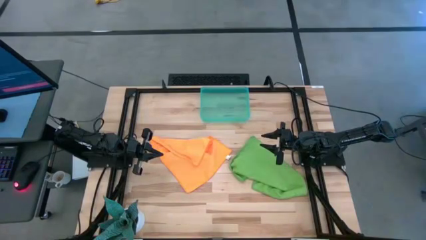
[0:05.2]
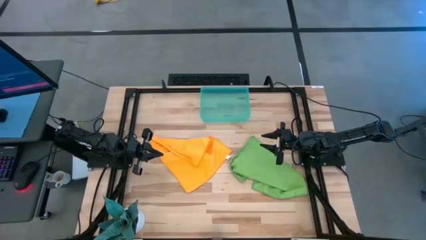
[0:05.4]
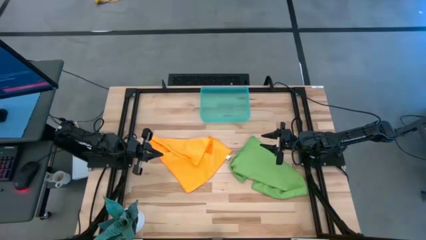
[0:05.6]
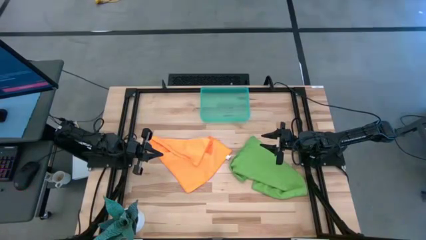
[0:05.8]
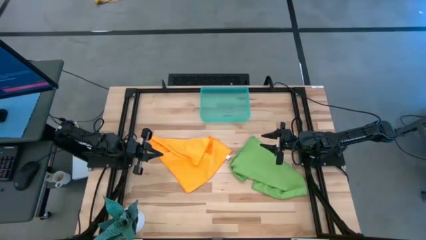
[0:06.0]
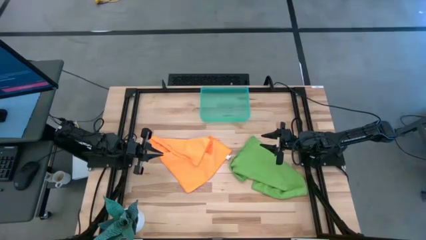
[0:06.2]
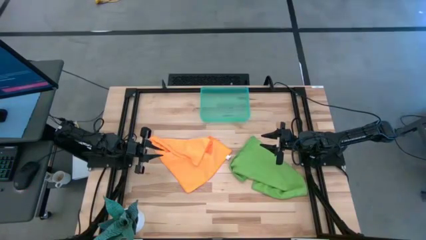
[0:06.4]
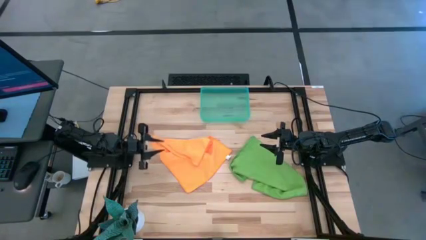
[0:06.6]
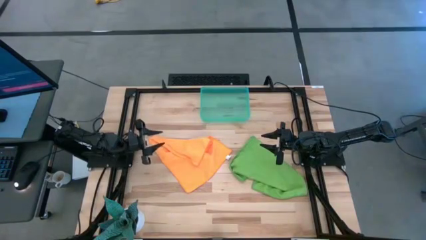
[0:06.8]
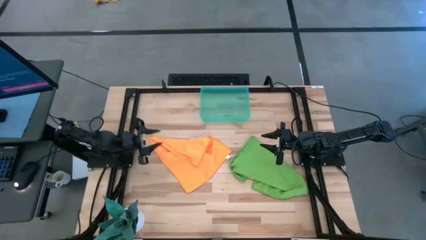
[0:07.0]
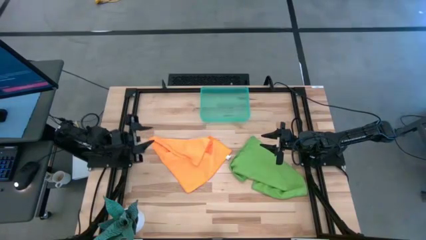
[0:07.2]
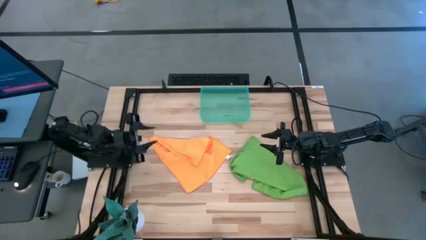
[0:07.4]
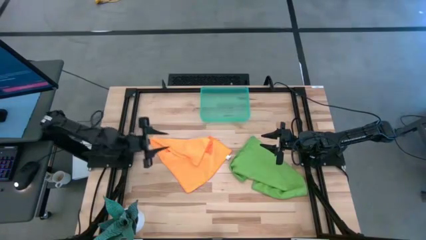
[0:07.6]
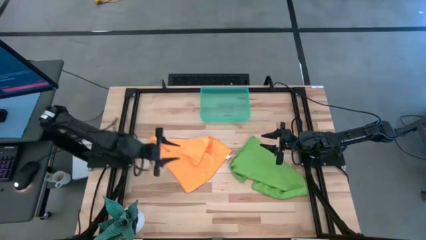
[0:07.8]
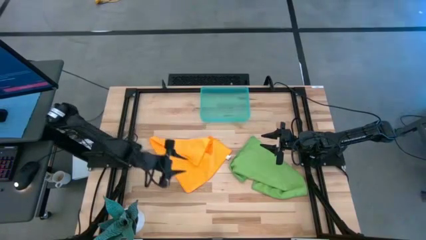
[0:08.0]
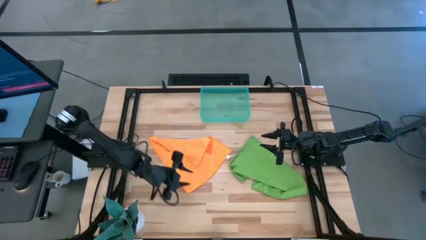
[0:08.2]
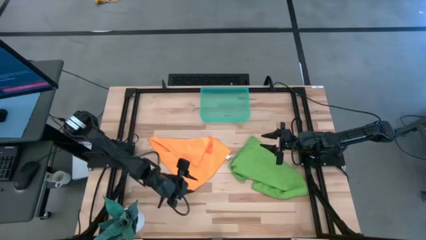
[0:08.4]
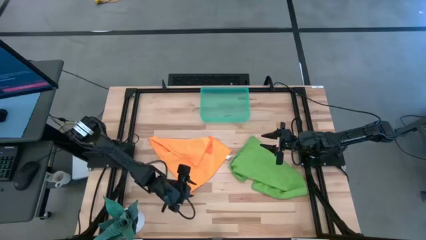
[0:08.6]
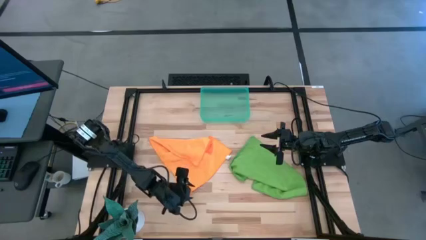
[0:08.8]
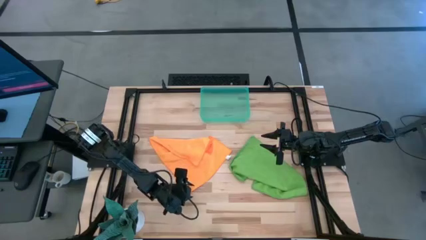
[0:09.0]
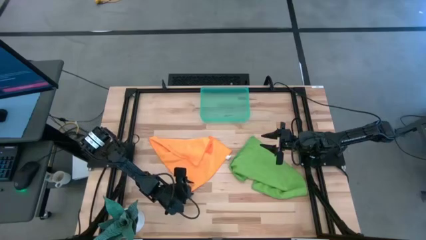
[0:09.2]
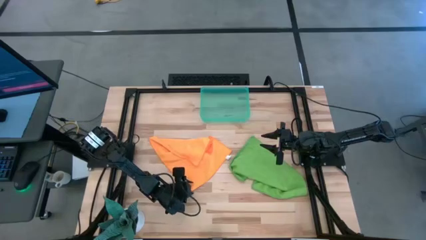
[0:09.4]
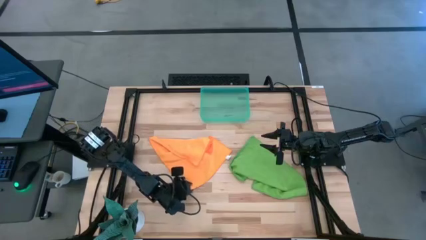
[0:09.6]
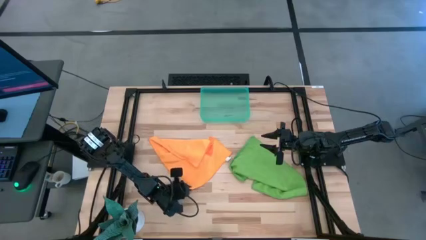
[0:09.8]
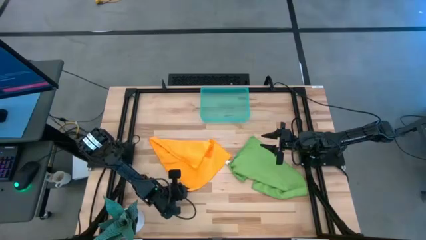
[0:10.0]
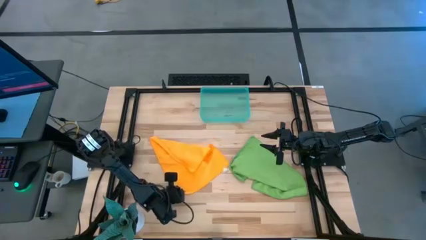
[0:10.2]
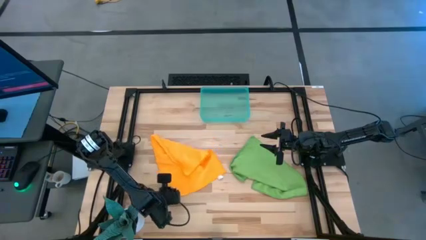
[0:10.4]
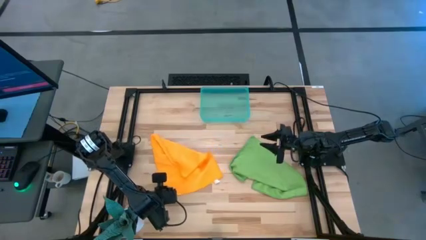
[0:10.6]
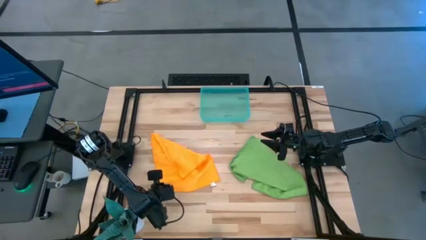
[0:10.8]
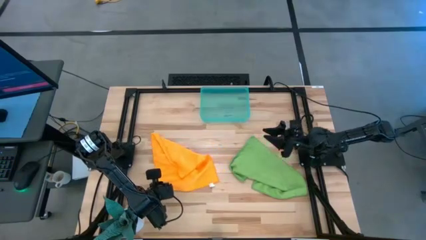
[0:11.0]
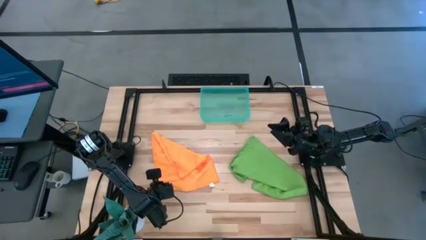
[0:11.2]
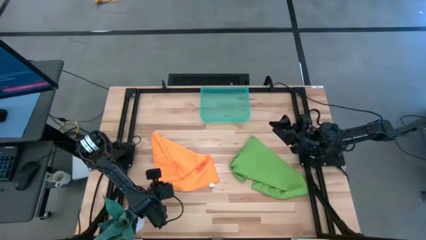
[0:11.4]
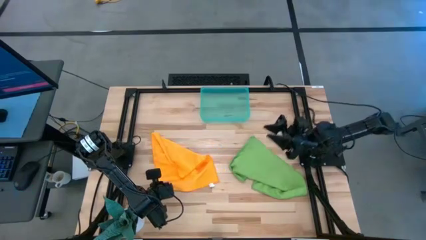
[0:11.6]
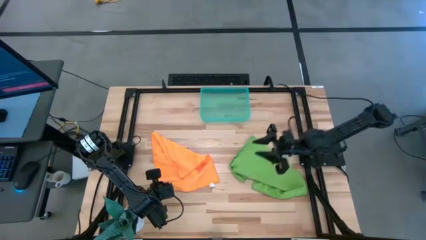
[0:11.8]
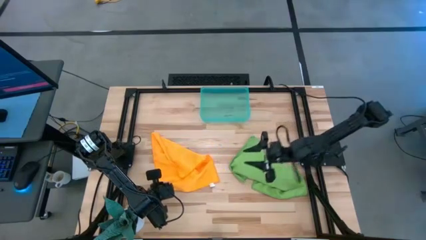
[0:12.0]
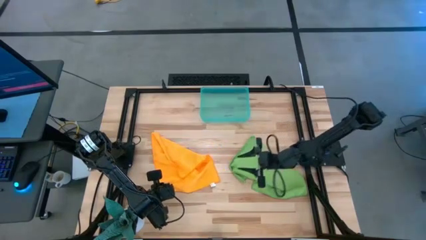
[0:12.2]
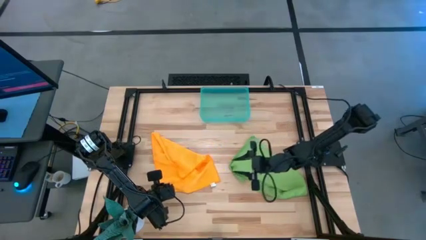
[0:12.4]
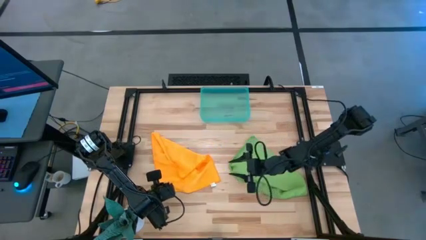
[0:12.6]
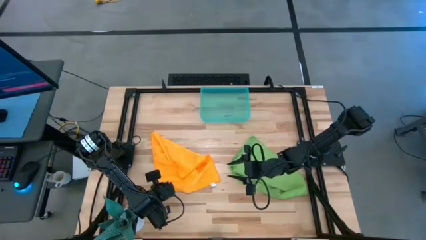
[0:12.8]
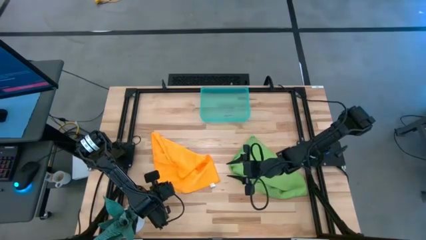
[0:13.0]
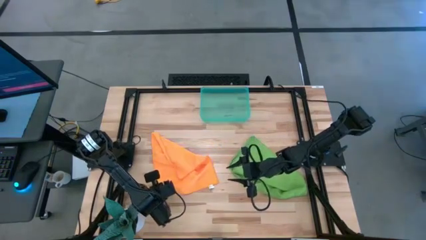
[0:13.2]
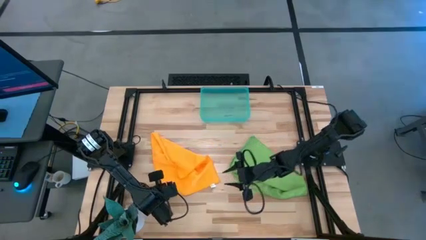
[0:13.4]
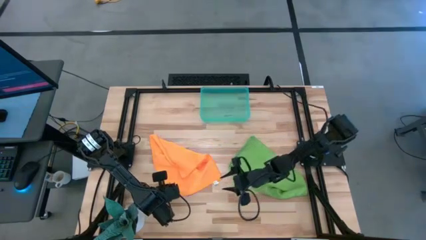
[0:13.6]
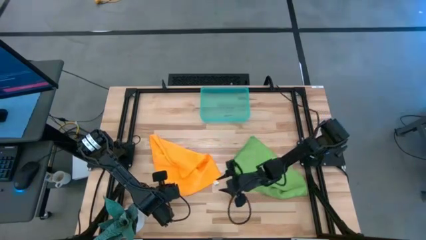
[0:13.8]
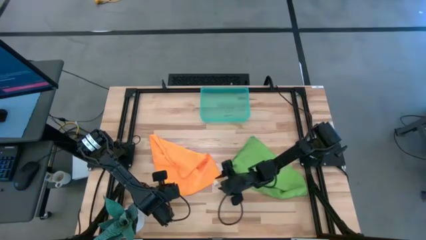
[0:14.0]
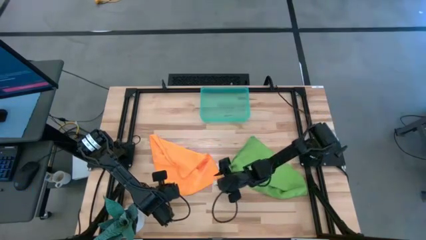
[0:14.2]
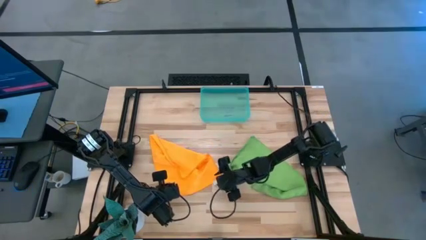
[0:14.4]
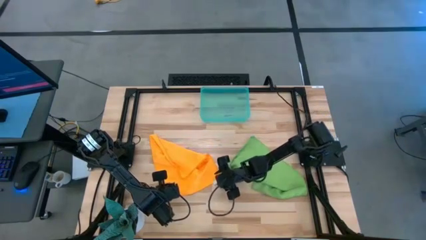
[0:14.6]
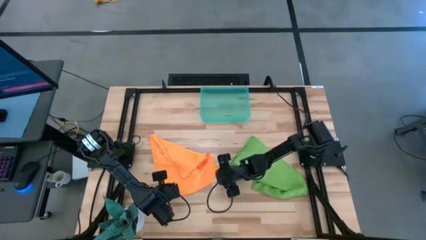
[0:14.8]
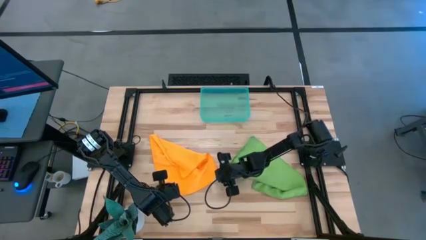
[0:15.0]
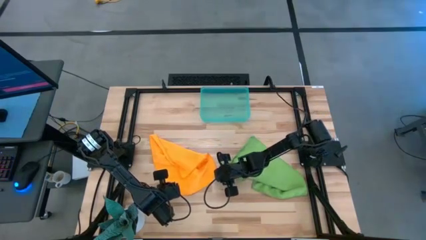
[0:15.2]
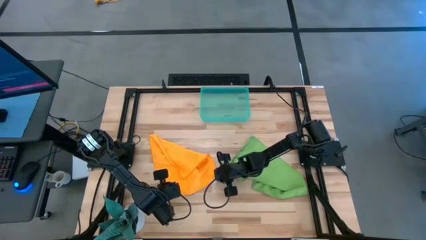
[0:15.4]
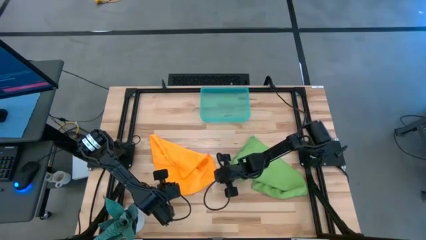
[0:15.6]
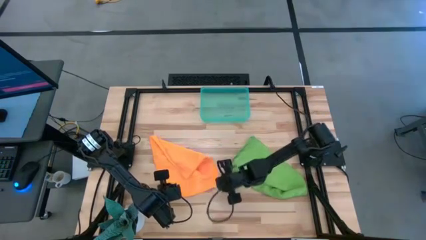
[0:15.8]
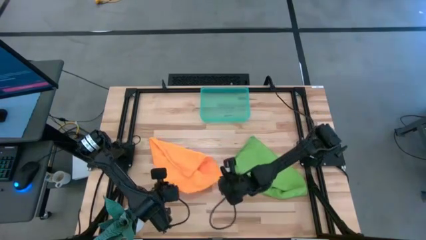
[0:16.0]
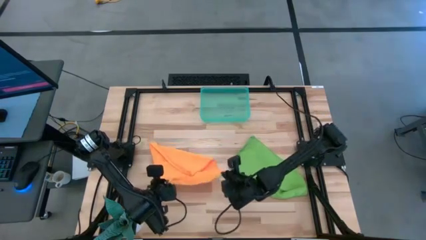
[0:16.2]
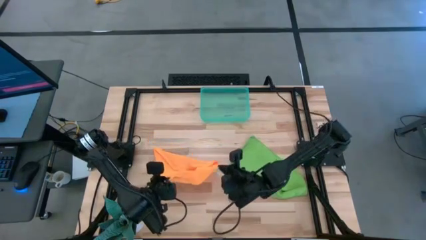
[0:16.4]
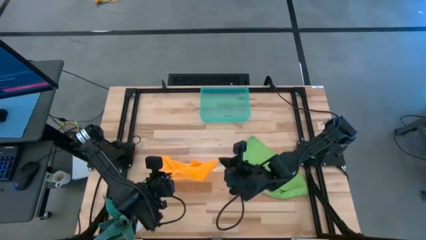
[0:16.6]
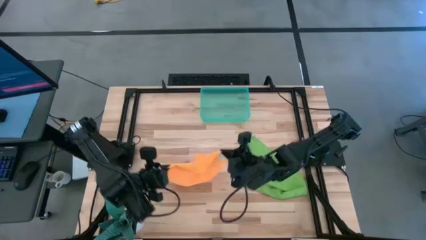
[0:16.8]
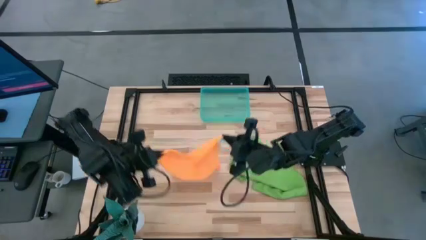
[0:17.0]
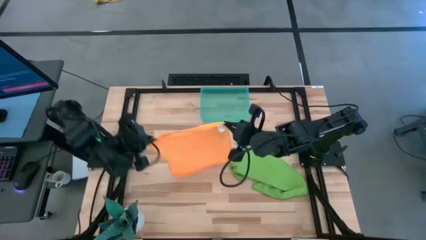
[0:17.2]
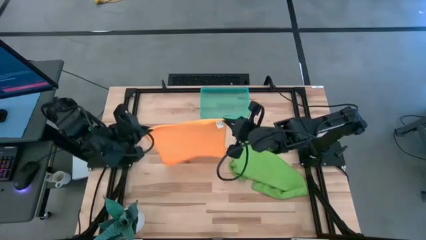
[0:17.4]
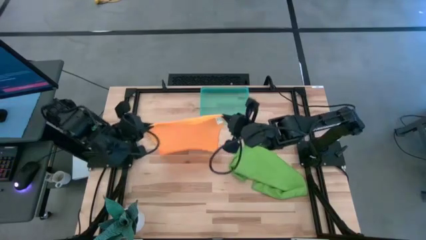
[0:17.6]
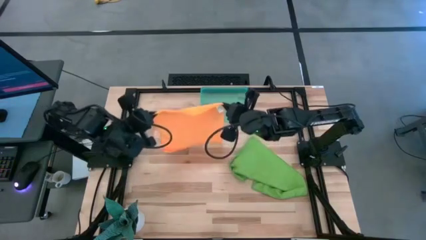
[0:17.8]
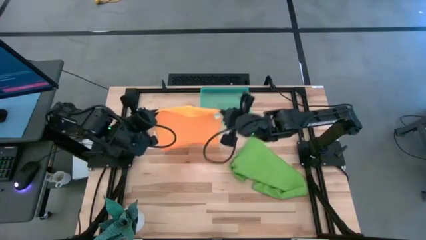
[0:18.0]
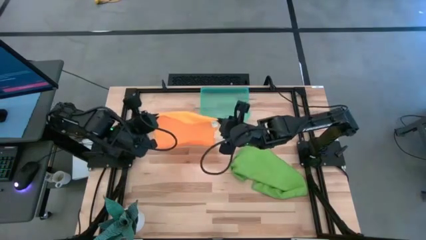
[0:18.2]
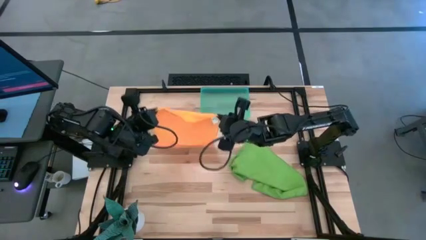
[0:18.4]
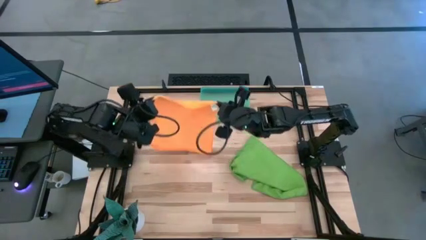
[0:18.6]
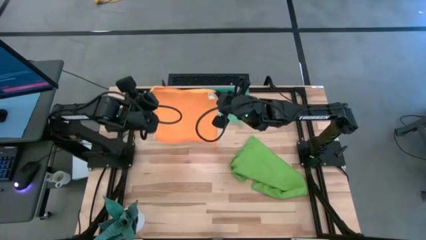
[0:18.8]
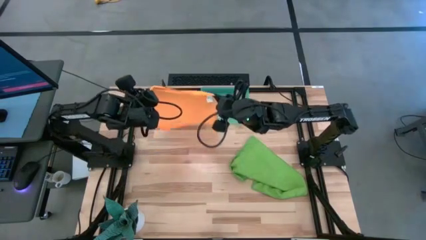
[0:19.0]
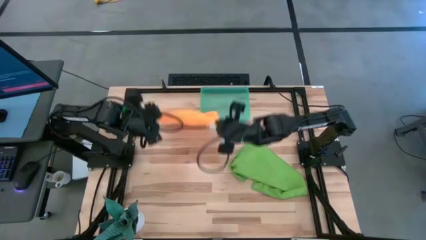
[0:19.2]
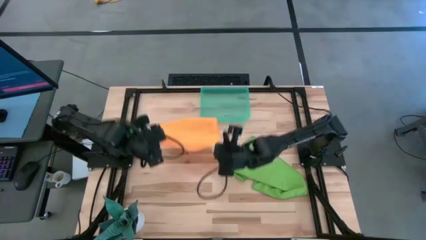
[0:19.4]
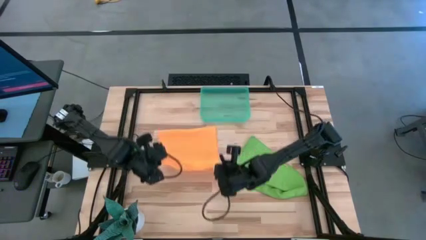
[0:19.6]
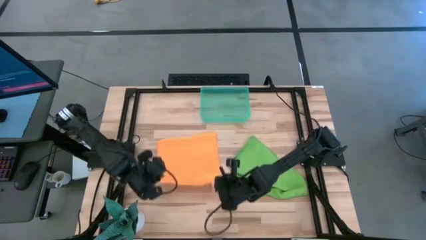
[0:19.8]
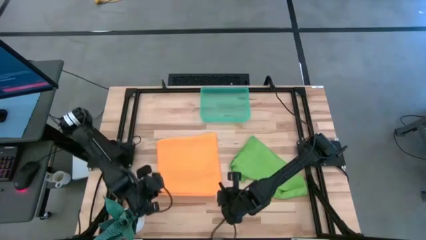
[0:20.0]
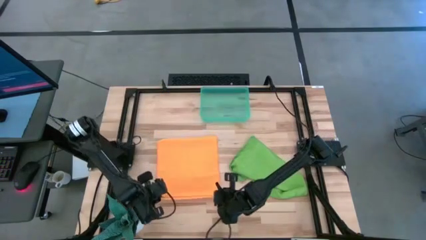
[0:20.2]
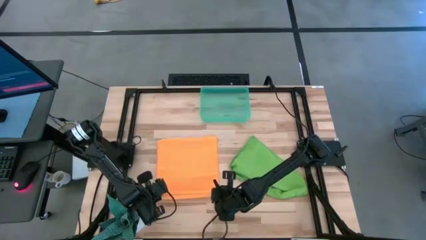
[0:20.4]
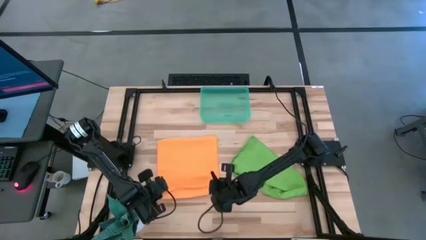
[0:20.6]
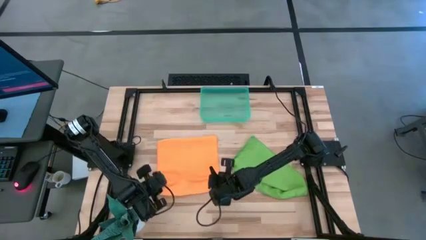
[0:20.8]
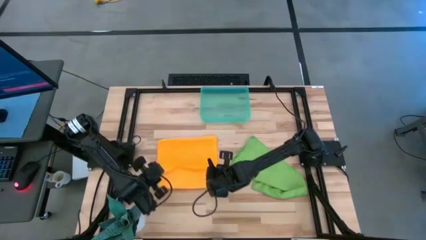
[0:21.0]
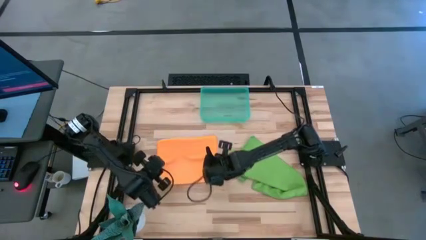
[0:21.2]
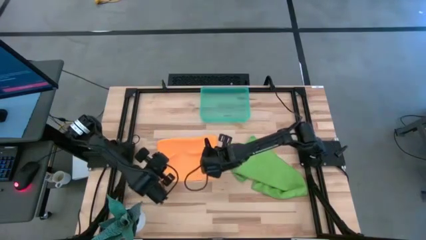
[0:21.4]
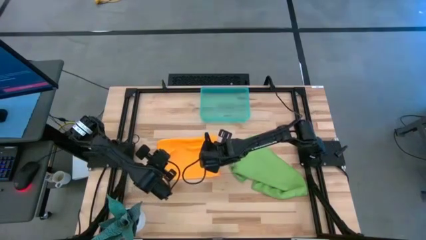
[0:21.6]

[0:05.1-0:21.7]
Task: Roll microfiber towels into tight, uniform cylinder then place into a basket
Fold the orange microfiber towel
